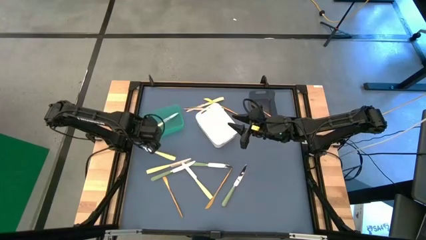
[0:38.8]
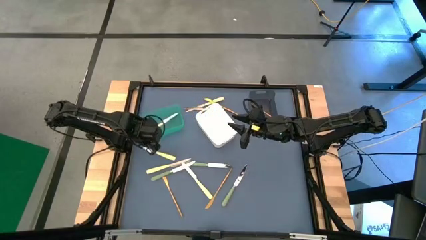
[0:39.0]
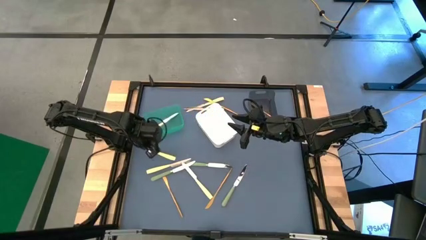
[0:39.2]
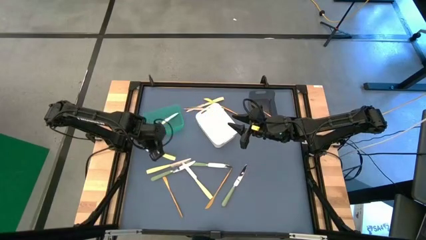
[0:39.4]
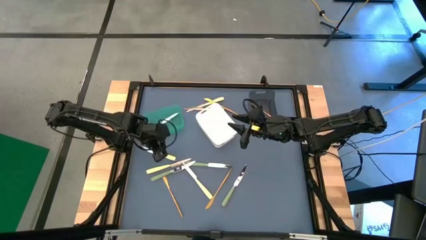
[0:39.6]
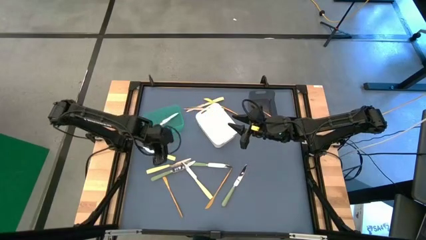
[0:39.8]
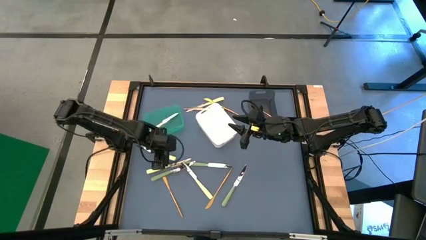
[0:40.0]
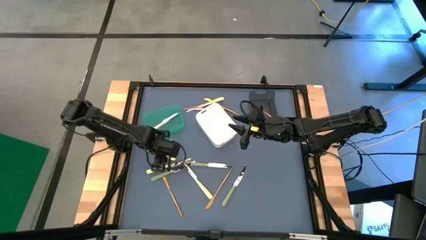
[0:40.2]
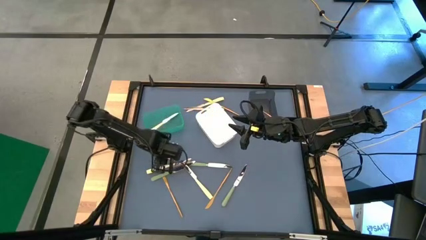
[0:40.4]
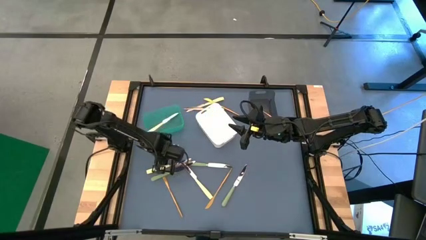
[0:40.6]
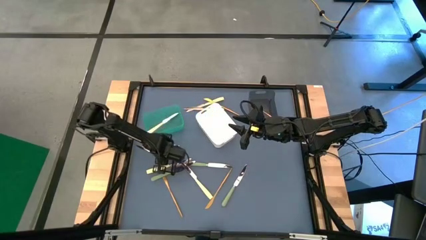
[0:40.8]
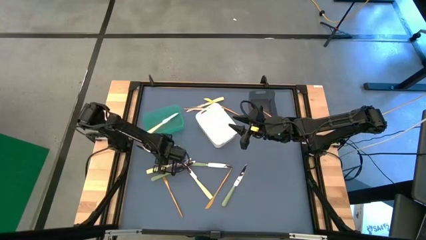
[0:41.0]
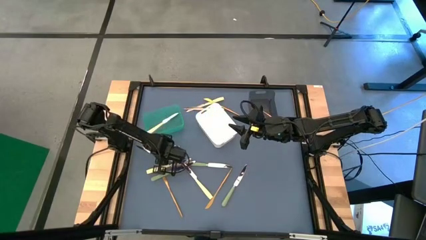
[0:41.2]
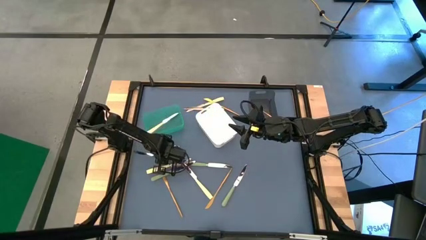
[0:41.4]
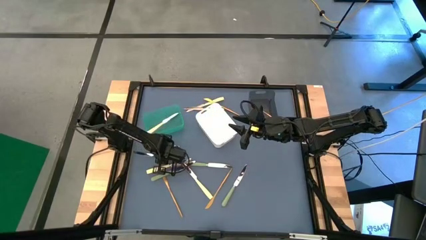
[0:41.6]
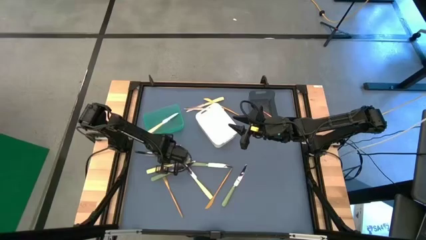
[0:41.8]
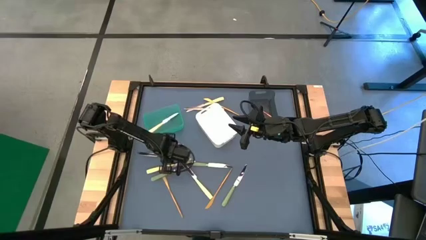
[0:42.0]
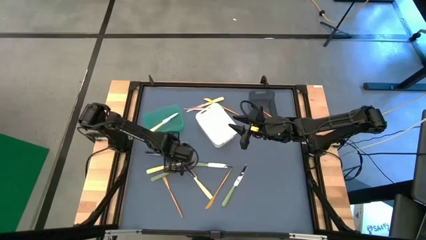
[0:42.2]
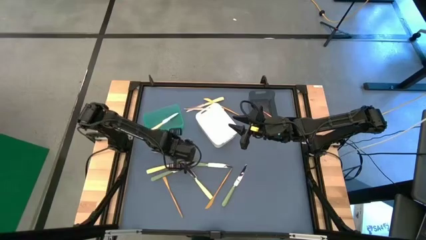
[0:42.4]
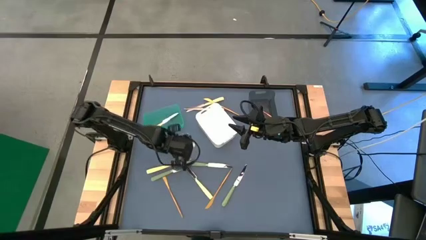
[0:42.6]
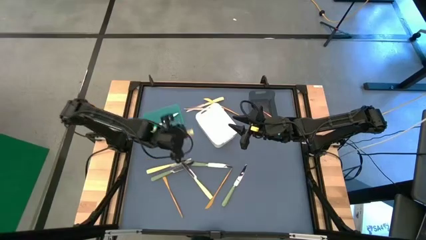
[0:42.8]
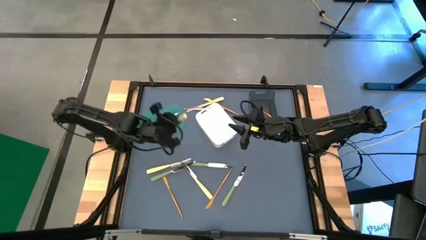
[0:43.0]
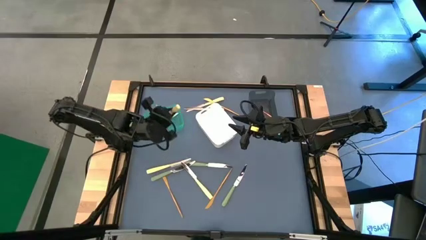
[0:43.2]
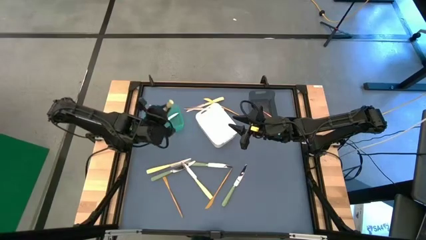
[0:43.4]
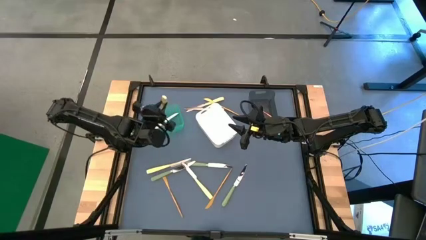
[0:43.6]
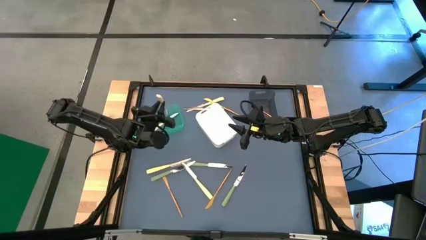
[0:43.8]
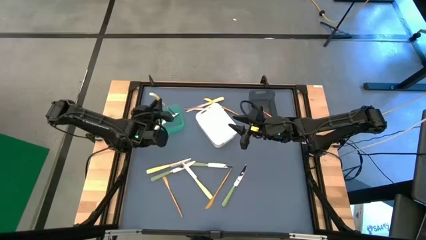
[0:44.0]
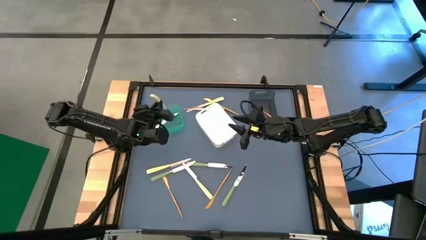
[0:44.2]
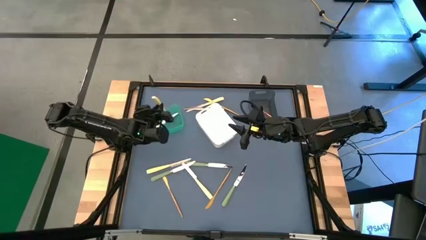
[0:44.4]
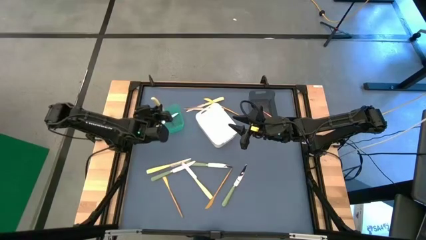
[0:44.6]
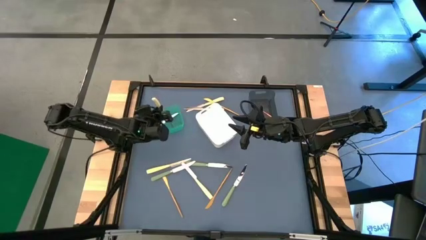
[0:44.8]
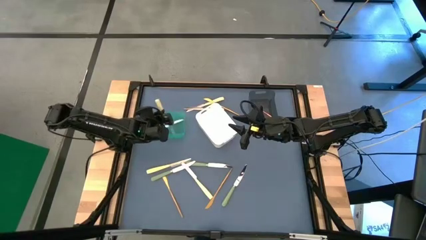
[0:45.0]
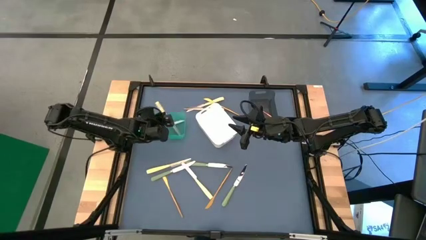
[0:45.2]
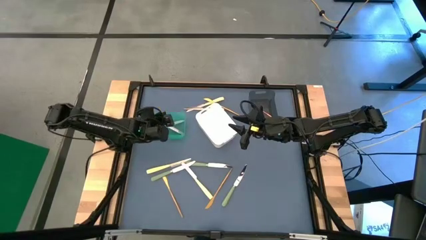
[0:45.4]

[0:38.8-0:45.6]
Task: Sort silverware by color (type)
Put the top left yellow table knife into the green bin

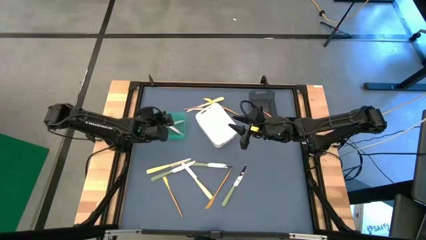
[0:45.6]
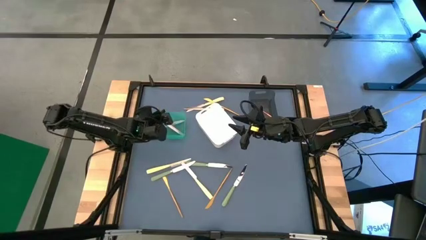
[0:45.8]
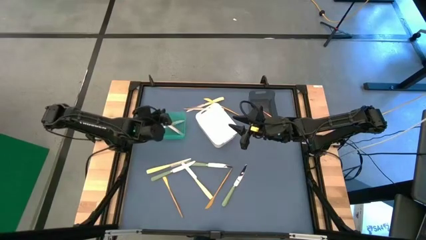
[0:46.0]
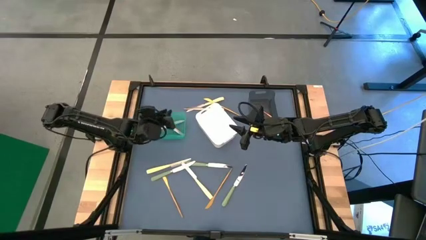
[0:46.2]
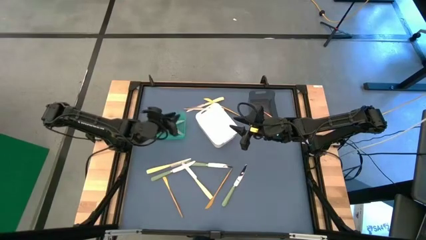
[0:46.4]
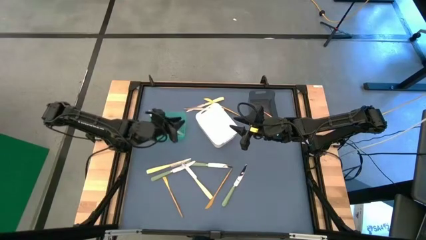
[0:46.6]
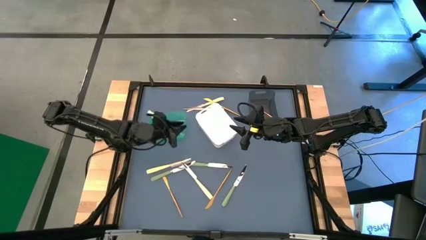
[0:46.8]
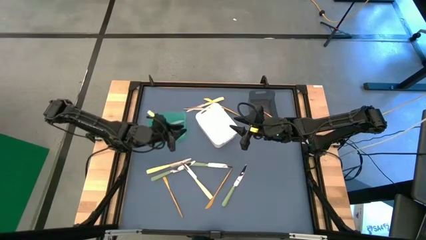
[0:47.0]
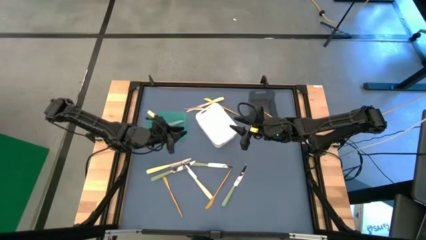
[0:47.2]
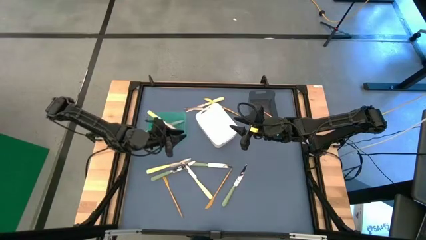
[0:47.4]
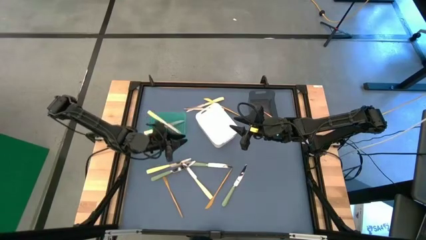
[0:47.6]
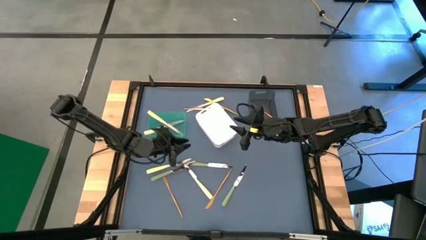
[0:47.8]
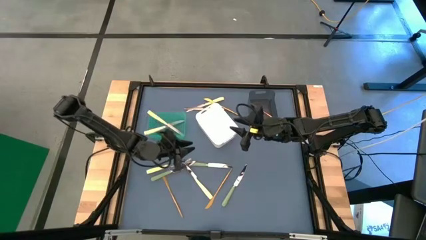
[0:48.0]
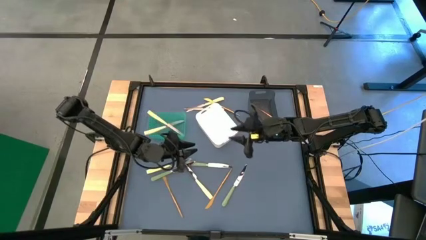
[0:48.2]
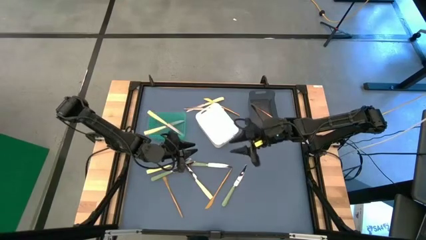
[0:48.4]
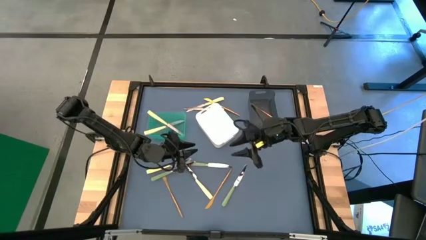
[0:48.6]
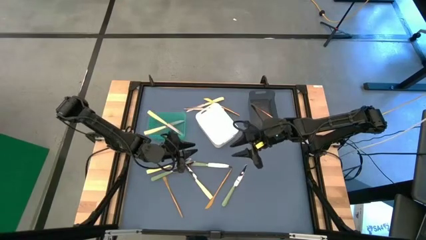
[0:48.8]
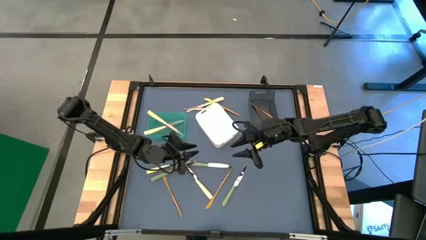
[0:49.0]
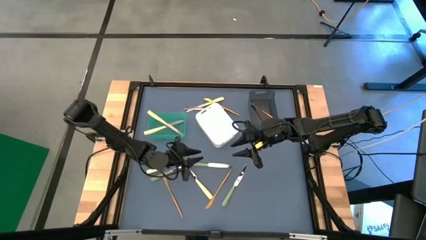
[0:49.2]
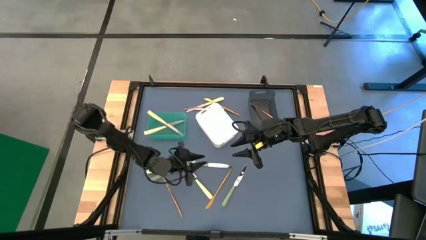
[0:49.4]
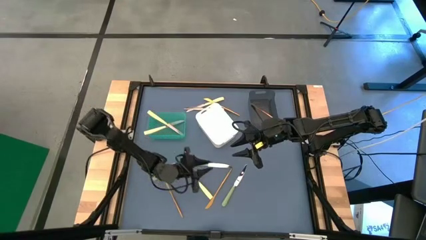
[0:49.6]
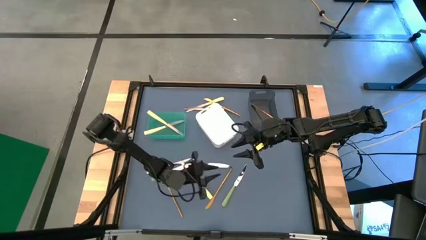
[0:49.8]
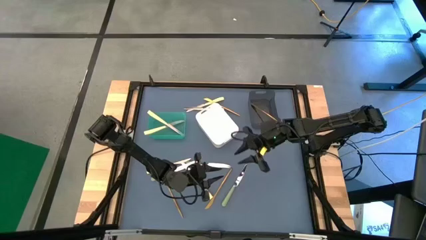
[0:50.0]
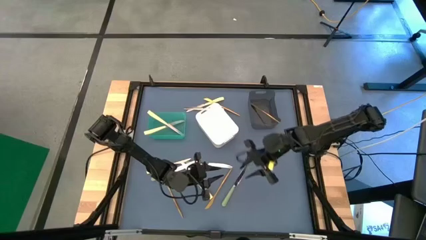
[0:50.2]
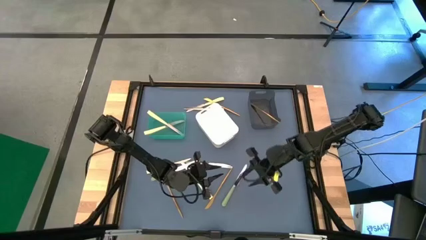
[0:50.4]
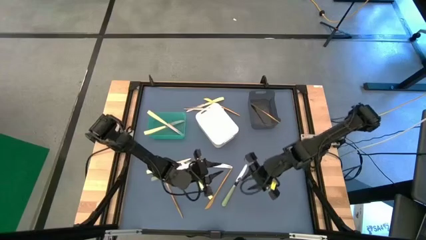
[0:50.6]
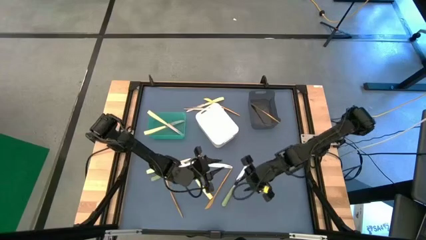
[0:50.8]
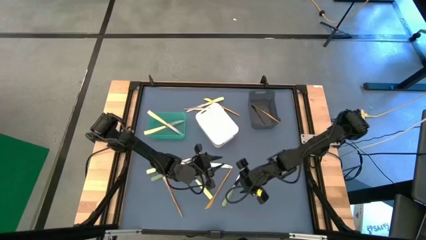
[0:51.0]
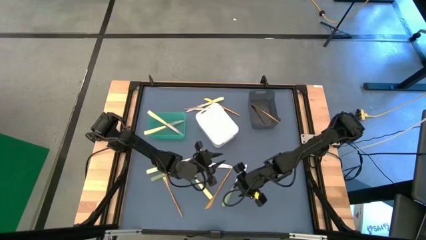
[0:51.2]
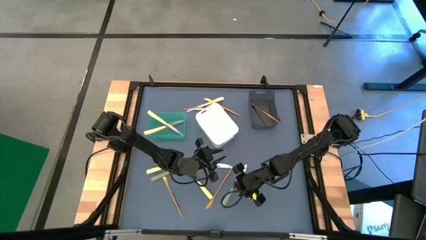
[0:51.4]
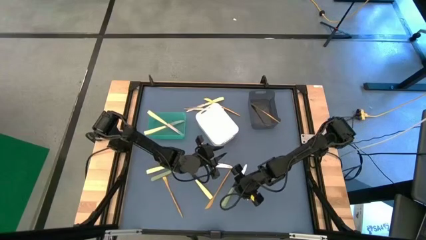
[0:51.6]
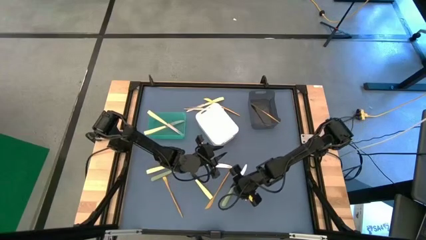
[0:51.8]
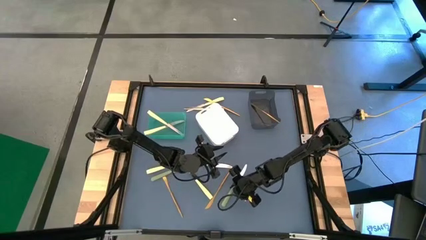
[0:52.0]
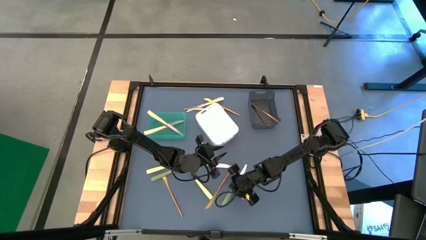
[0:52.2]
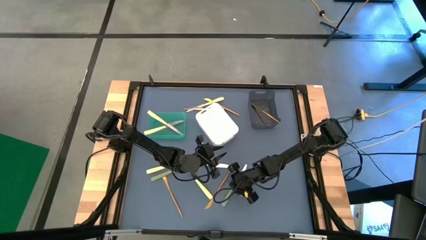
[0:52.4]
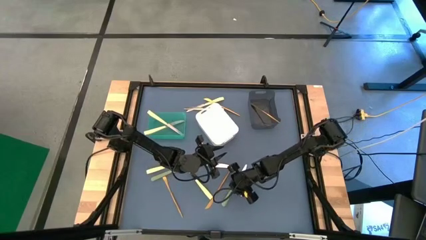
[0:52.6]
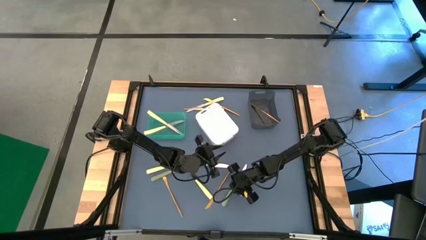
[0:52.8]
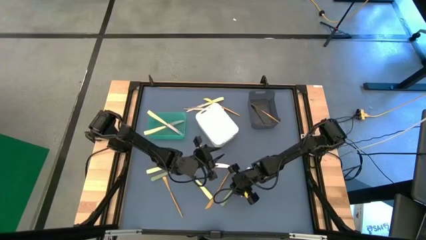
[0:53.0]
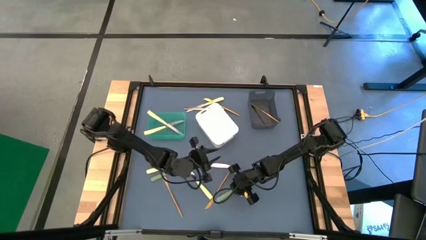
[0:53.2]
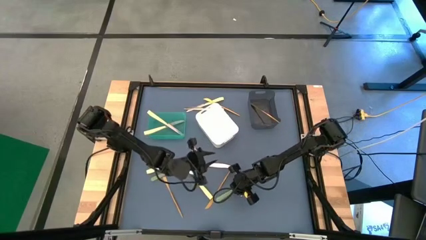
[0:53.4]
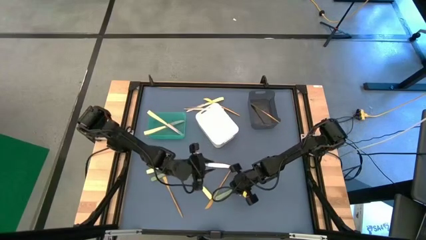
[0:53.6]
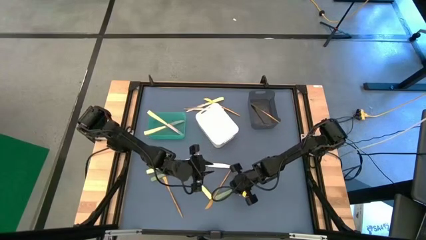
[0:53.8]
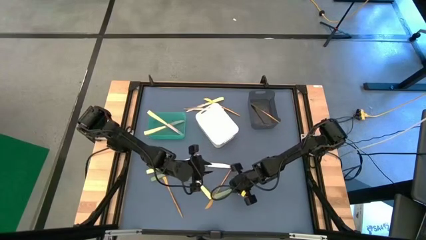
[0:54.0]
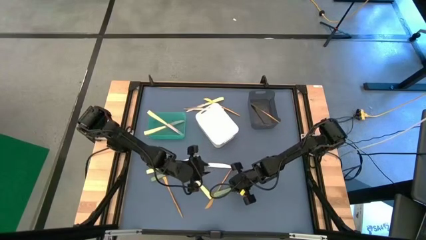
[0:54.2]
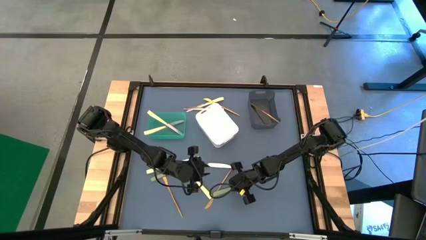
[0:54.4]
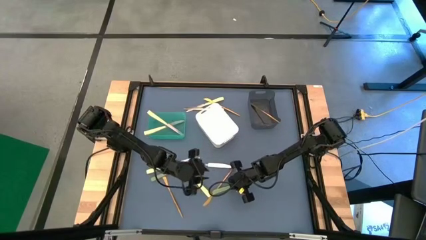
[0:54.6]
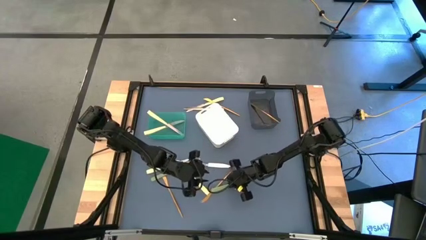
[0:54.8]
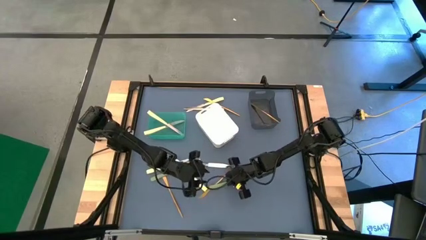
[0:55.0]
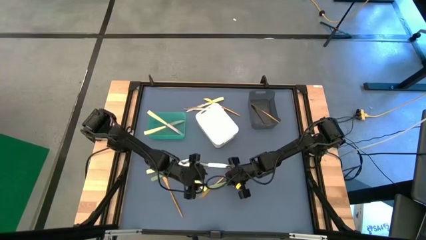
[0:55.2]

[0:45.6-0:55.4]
Put the right green table knife into the white bin
